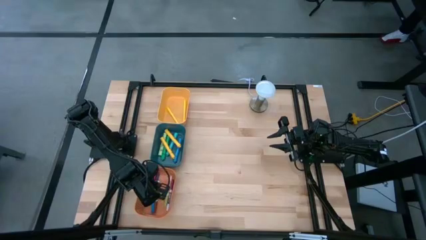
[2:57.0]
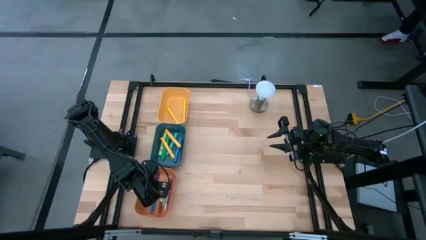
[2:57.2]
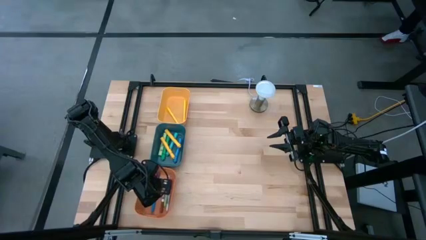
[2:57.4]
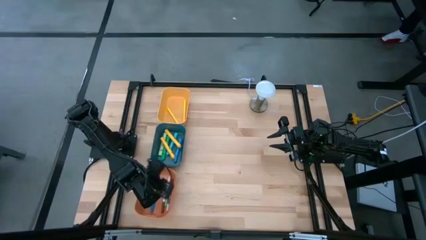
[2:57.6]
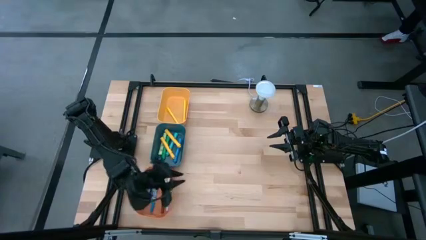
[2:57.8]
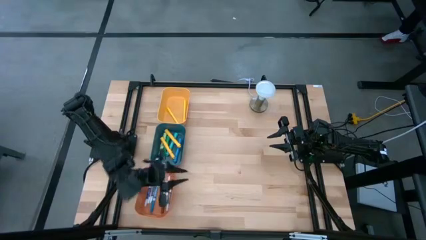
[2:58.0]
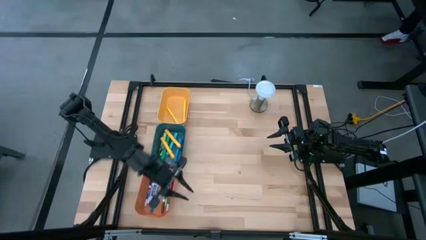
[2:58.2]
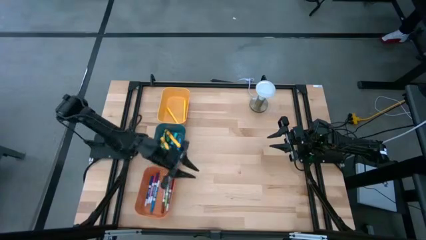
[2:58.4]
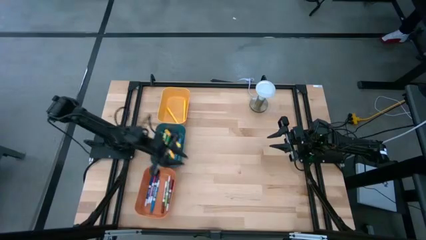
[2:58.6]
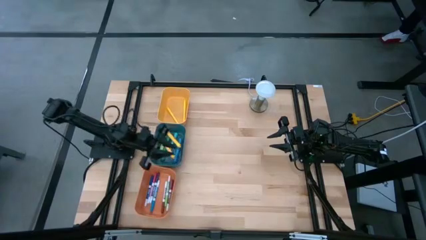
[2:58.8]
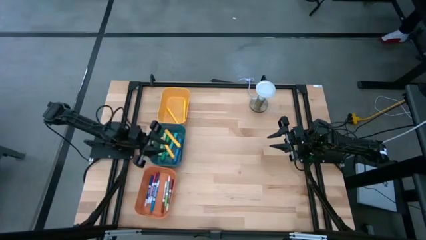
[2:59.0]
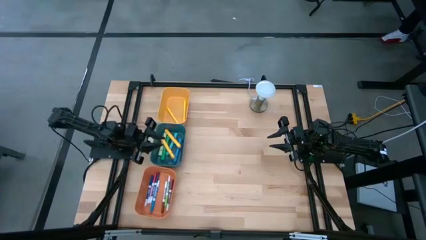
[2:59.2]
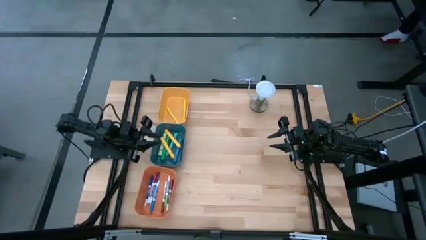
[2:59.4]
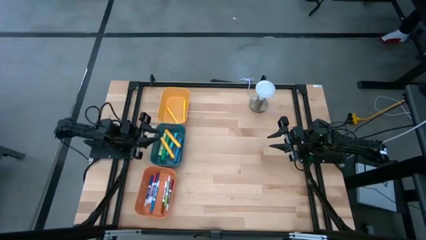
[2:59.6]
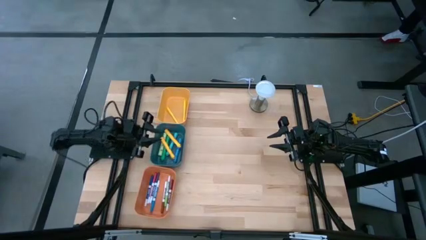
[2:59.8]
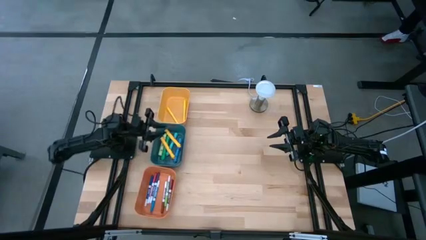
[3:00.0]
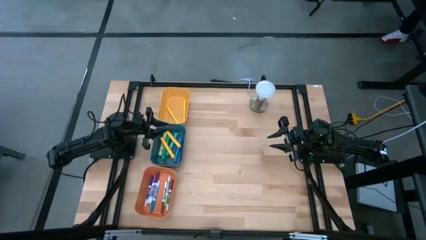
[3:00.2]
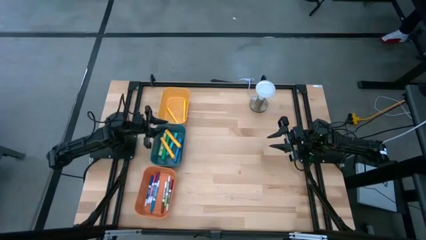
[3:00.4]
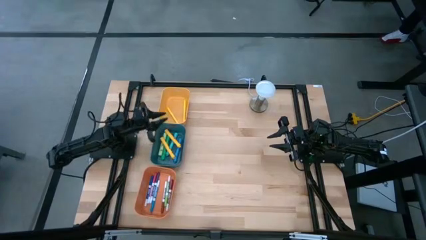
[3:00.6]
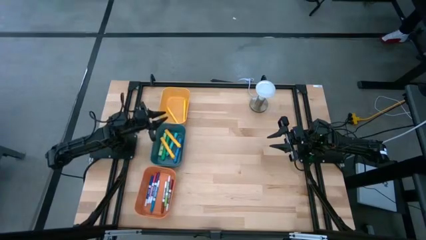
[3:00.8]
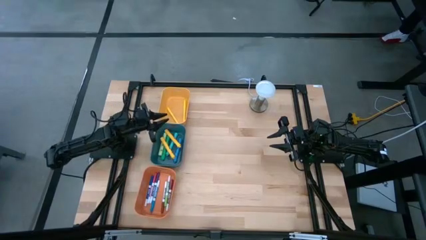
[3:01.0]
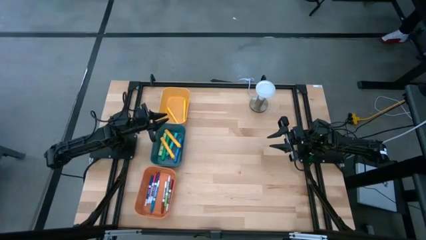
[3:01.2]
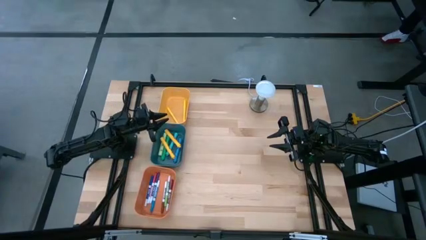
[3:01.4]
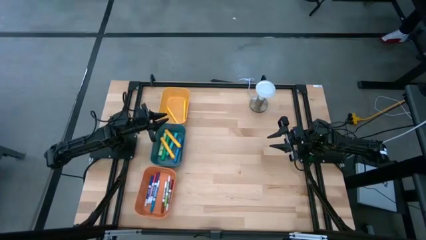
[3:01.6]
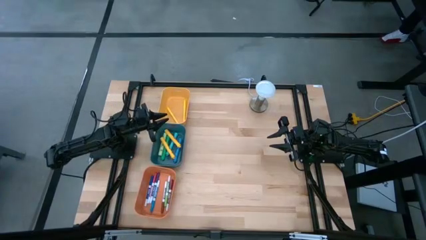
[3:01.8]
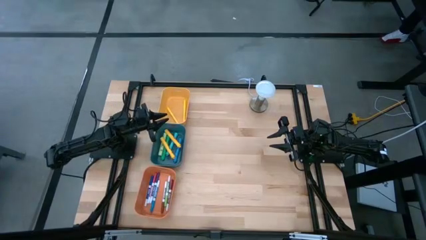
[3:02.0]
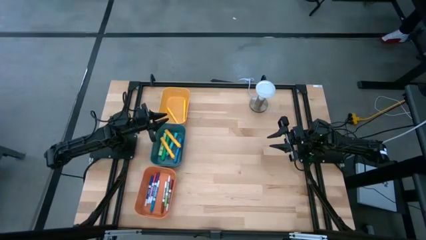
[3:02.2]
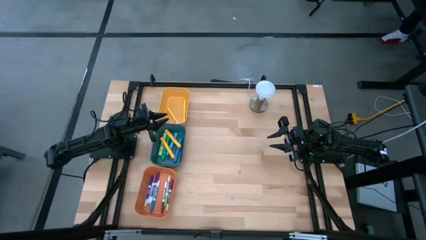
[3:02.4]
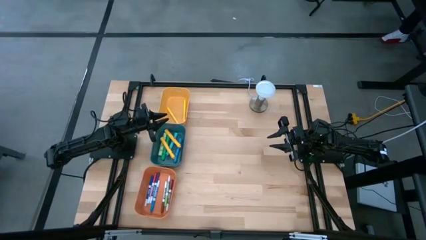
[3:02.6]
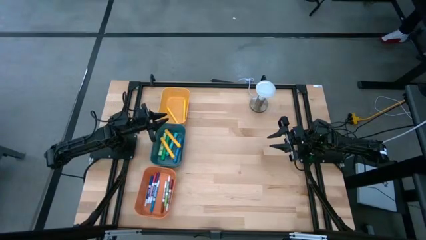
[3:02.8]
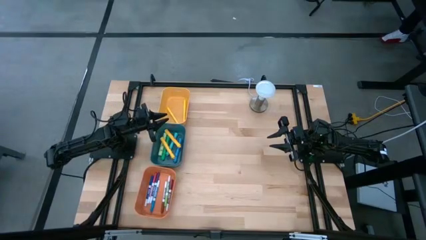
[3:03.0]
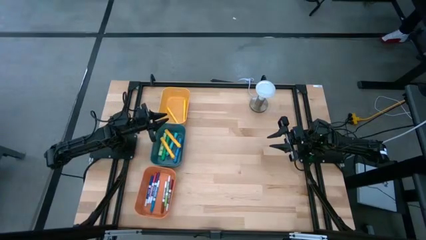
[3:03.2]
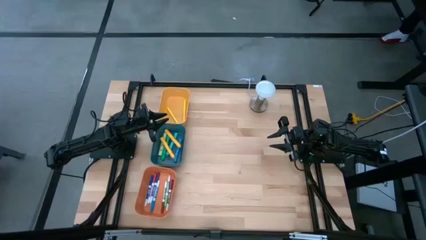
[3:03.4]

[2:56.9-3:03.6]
Task: Pick & Place Markers
Return to Home Position

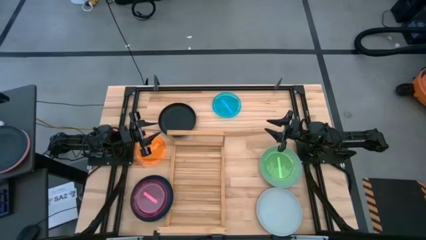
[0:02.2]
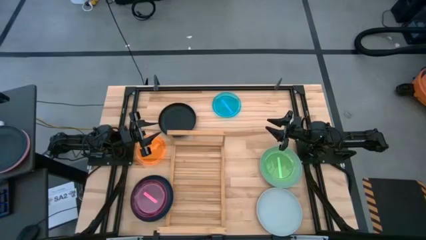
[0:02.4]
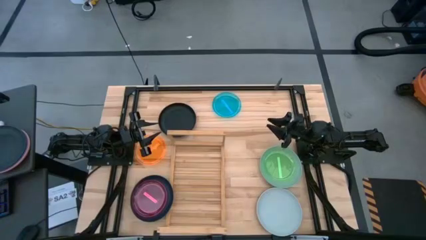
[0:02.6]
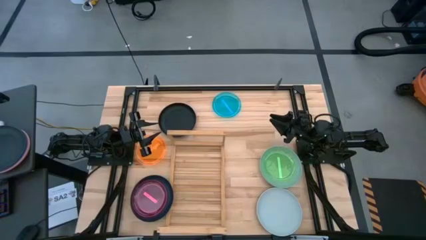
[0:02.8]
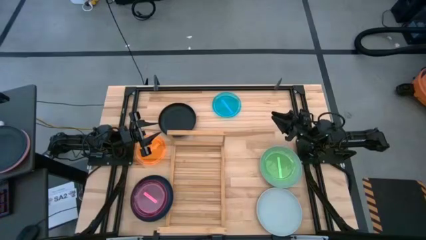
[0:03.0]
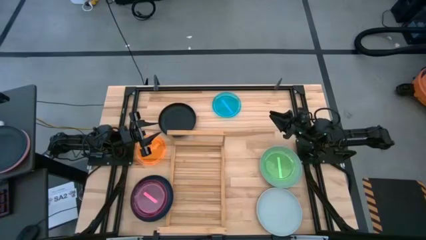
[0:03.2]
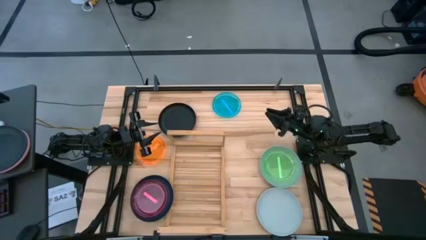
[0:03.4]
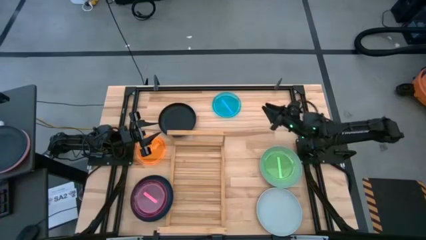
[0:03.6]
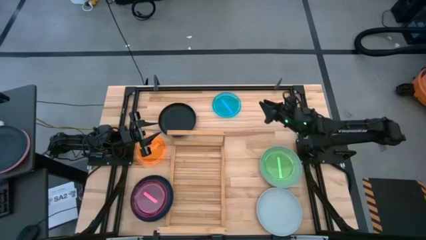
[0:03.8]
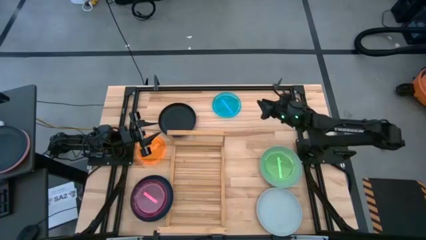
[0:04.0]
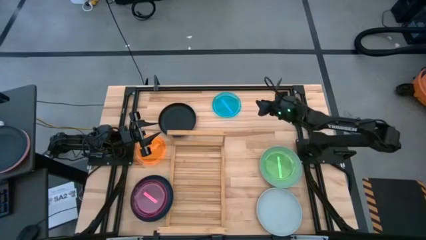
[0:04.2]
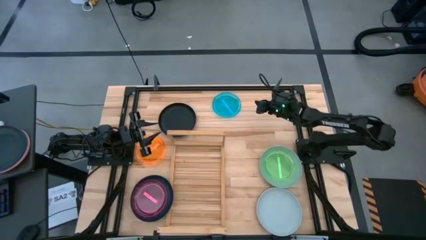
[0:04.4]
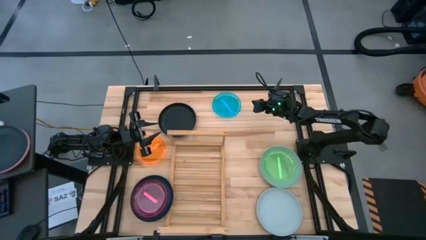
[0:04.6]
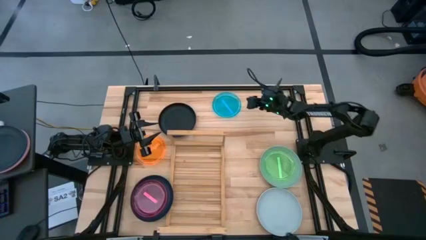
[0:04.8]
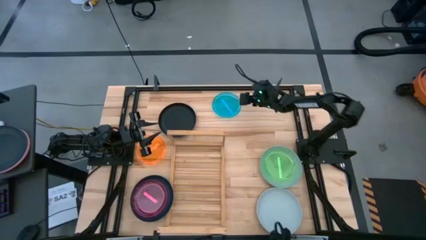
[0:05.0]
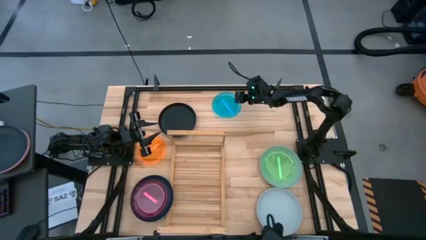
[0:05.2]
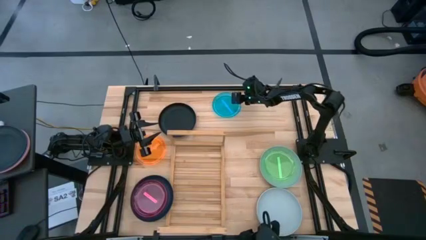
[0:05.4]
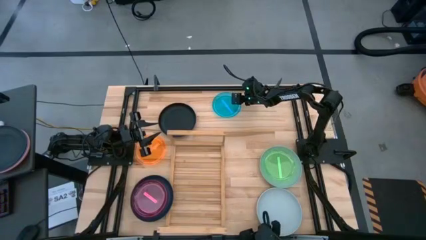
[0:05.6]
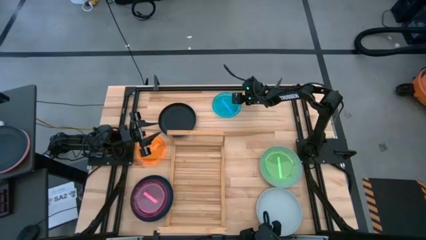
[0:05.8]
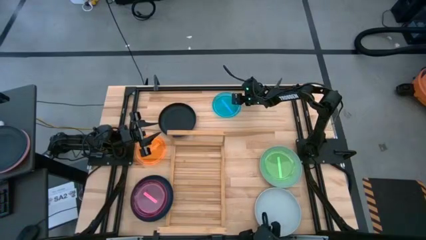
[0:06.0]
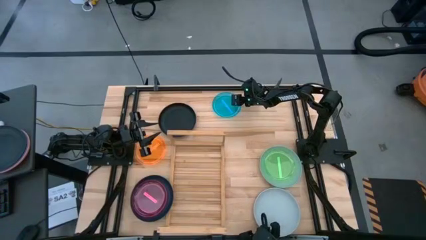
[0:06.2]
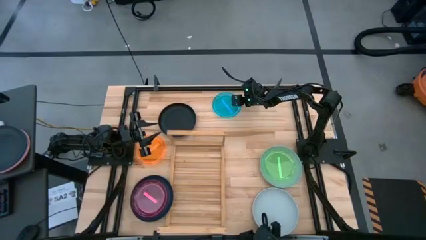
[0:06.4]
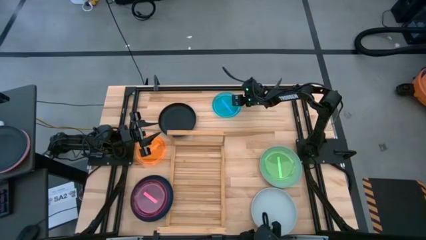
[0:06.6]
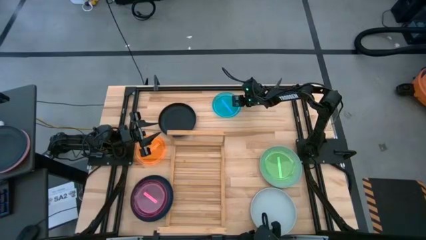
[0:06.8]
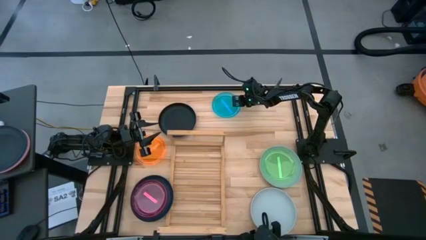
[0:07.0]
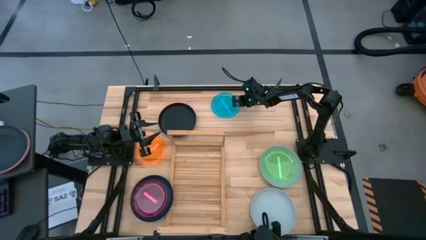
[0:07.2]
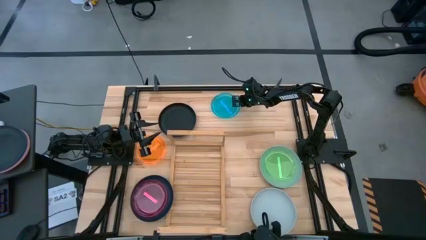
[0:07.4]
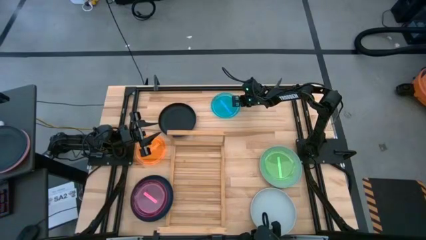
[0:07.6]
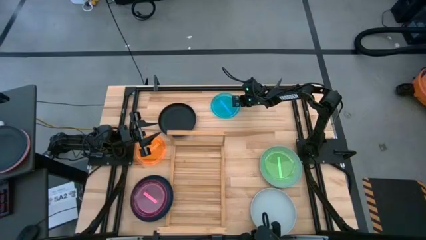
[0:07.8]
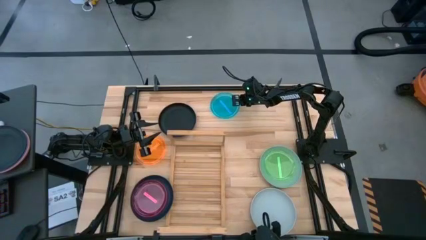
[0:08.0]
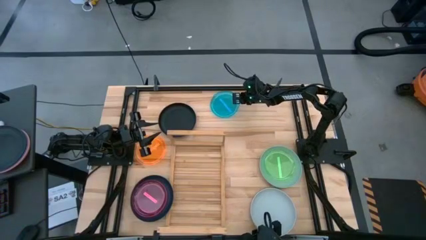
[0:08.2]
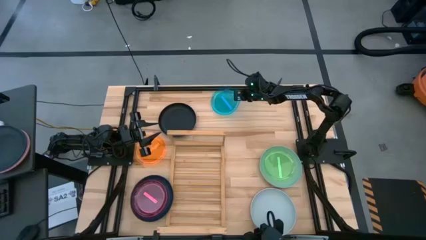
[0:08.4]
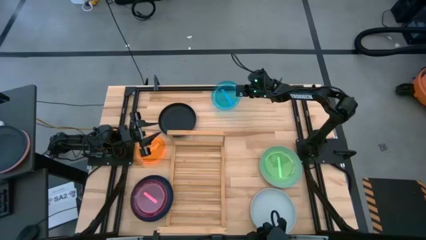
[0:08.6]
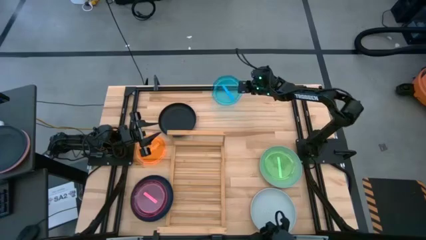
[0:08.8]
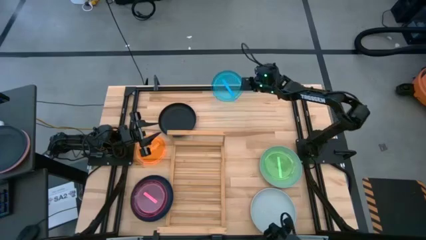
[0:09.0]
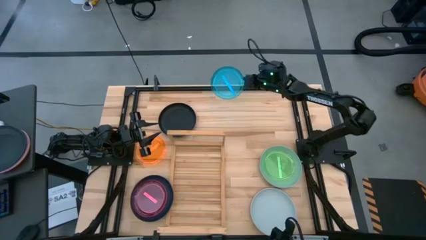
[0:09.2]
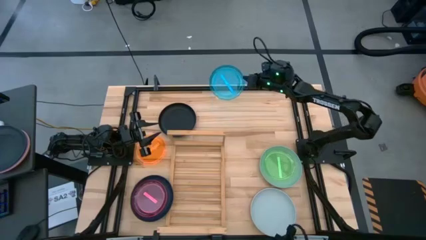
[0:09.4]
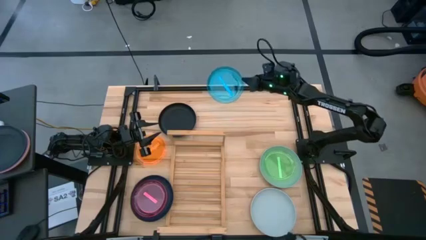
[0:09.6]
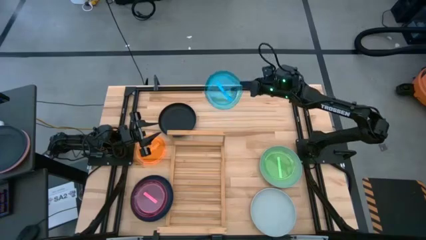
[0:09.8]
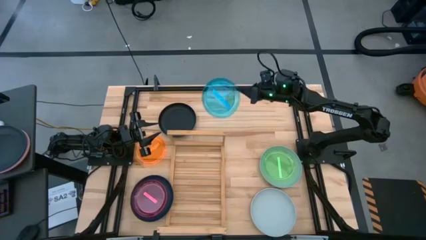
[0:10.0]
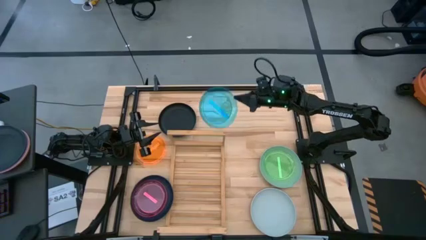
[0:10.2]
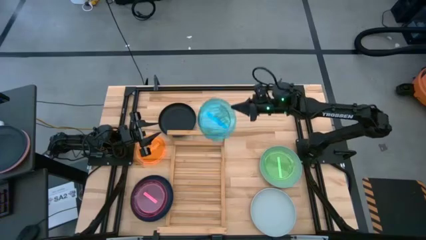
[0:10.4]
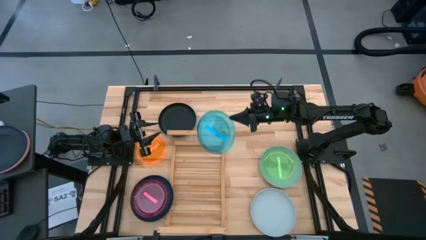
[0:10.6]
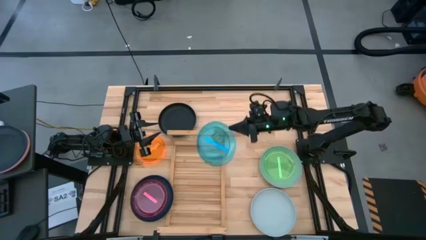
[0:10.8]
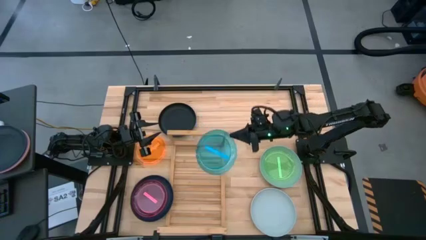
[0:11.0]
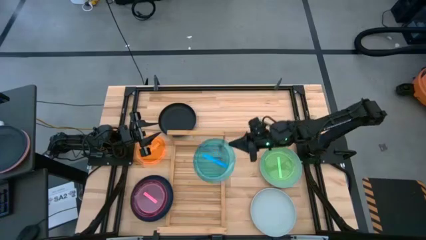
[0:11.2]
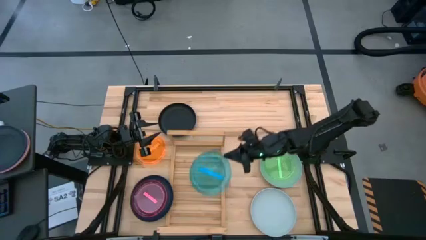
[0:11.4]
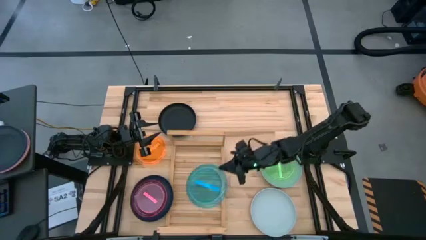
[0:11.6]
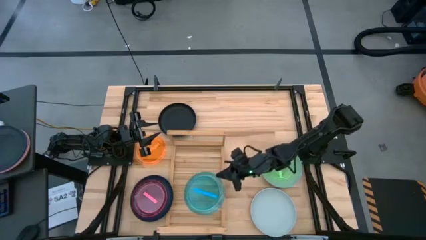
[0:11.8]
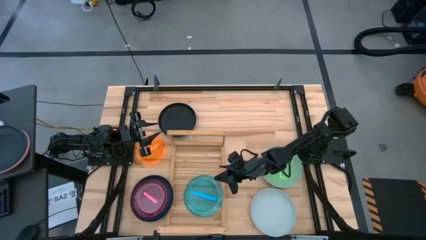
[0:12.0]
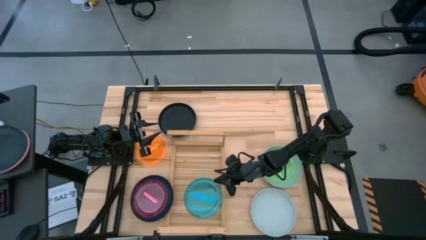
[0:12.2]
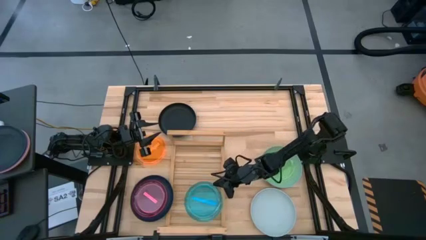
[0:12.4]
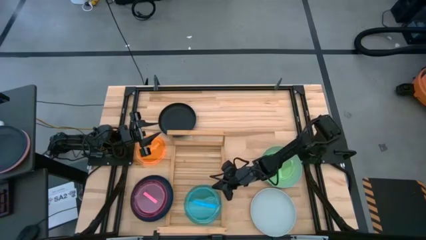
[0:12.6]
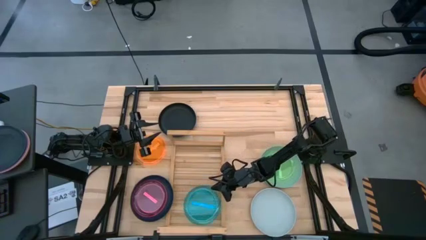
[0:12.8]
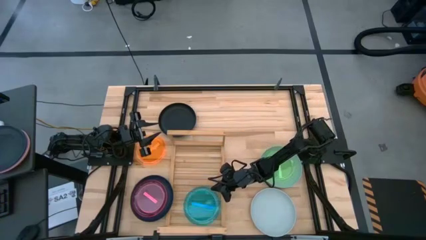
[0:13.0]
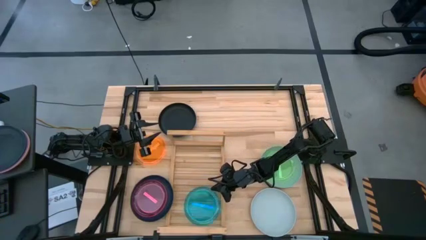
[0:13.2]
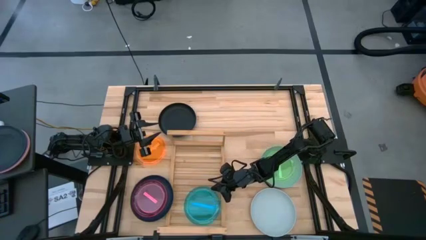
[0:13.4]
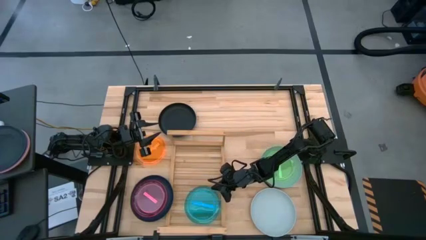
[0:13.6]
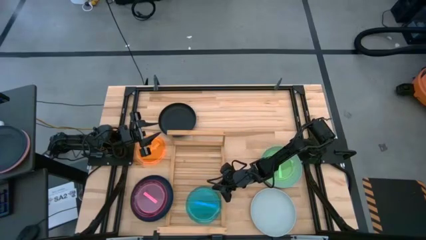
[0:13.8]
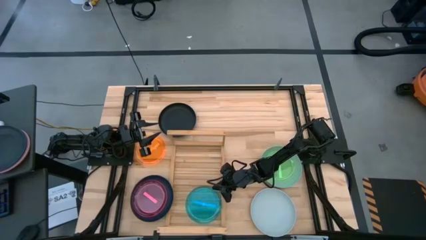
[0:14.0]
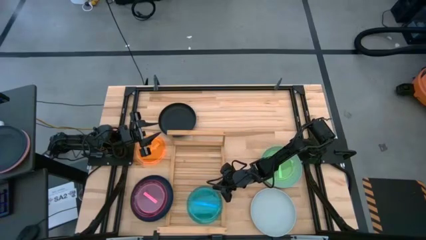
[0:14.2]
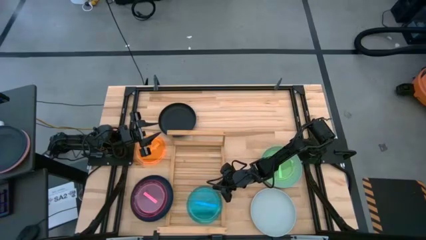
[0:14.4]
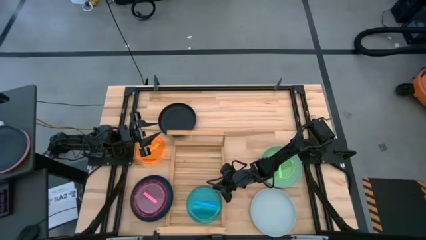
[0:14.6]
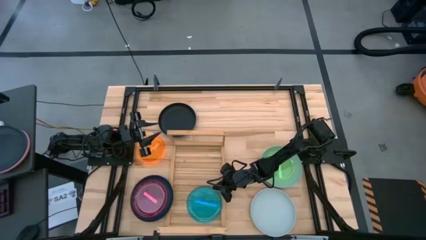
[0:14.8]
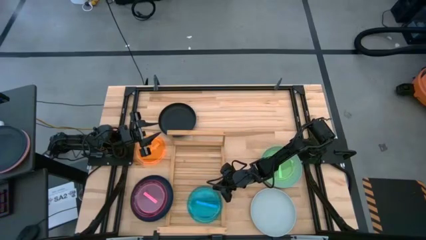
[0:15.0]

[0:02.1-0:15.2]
Task: Place and stack plates onto a shelf
Put the small blue transparent plate on the shelf
